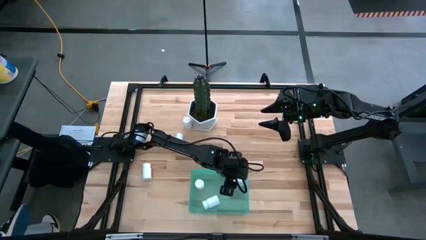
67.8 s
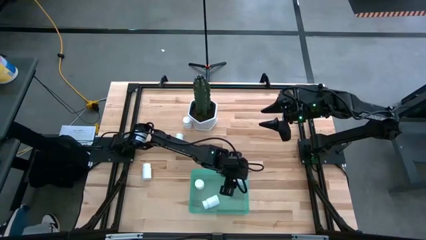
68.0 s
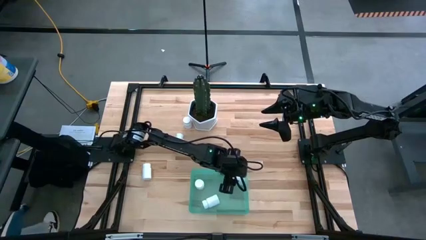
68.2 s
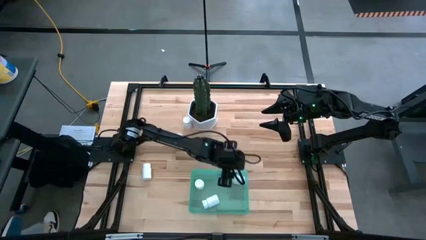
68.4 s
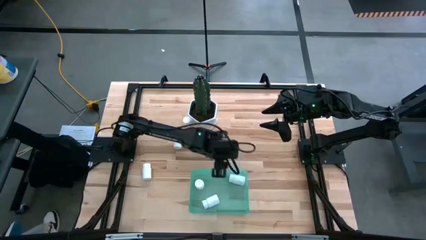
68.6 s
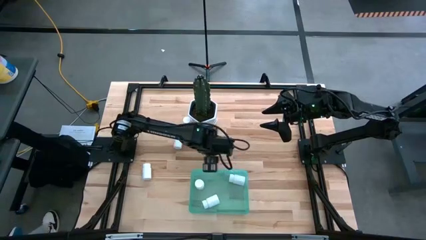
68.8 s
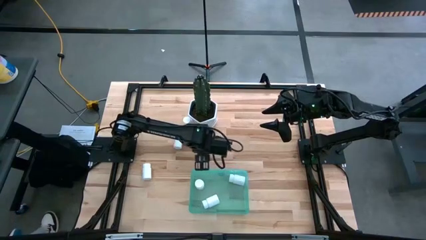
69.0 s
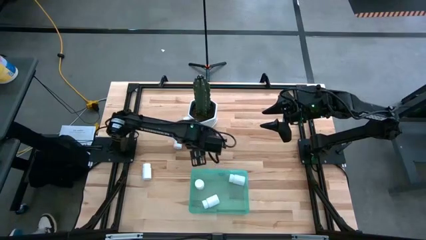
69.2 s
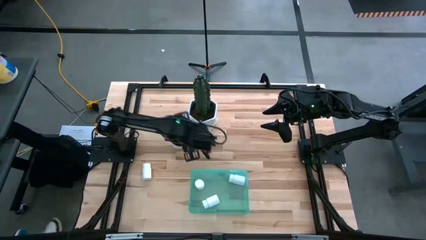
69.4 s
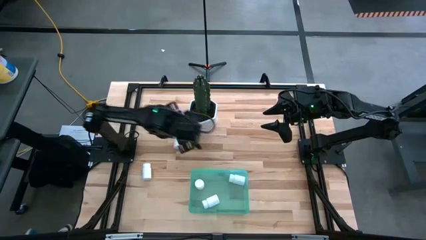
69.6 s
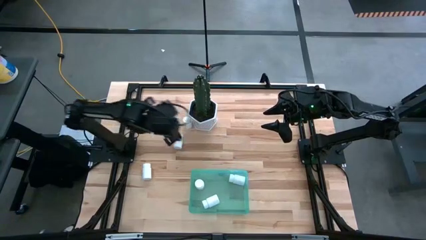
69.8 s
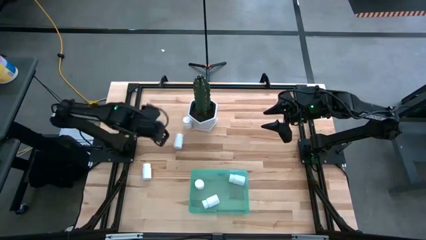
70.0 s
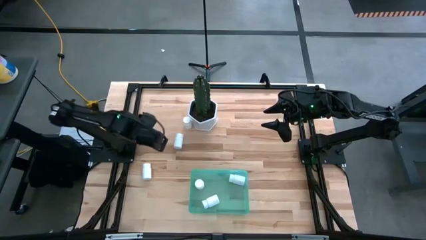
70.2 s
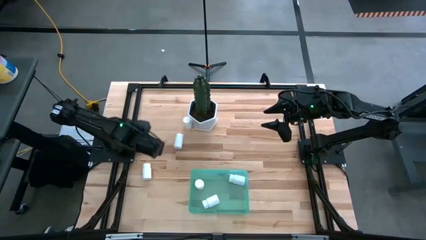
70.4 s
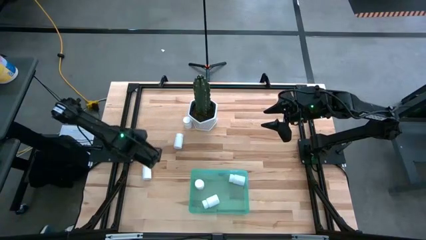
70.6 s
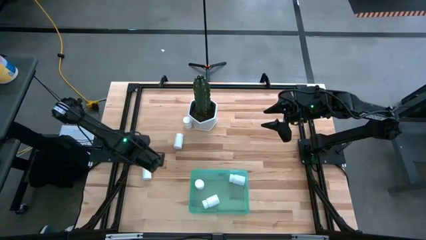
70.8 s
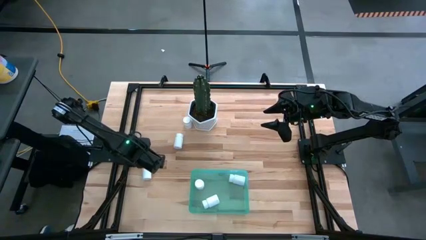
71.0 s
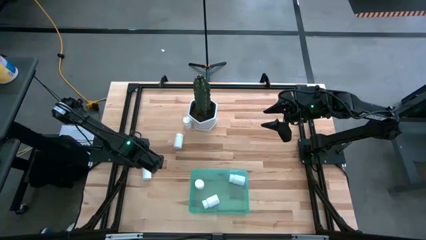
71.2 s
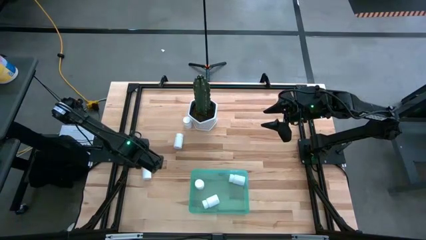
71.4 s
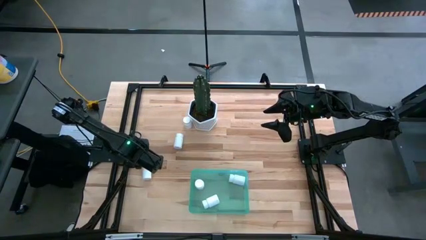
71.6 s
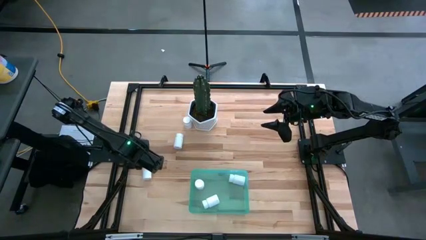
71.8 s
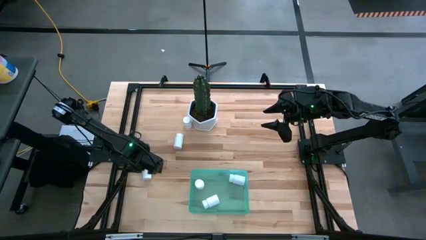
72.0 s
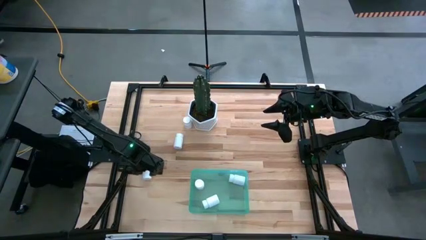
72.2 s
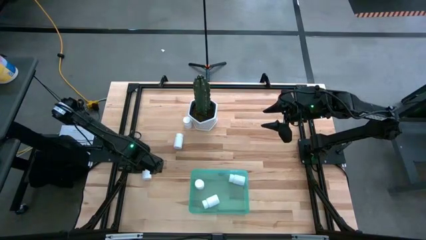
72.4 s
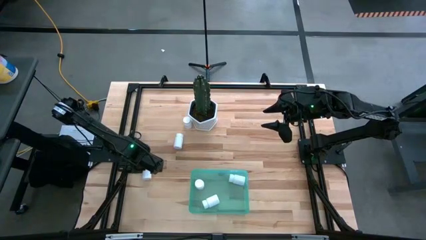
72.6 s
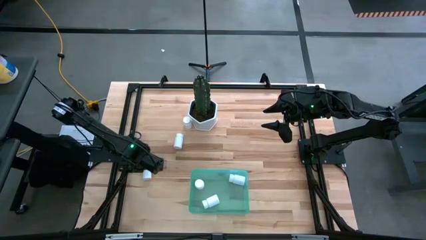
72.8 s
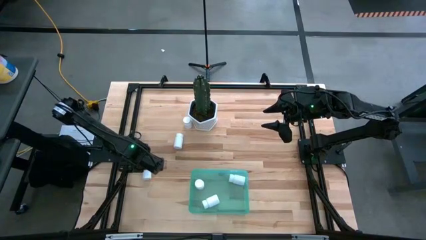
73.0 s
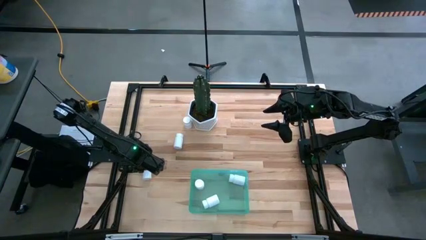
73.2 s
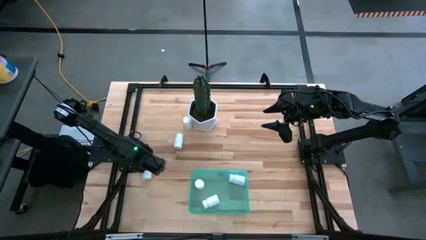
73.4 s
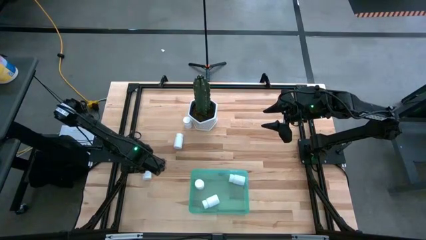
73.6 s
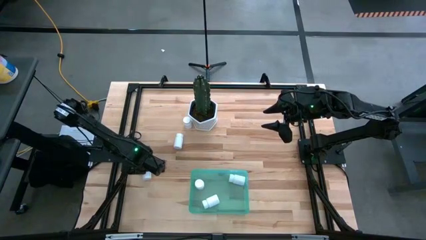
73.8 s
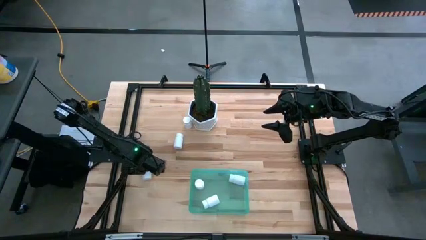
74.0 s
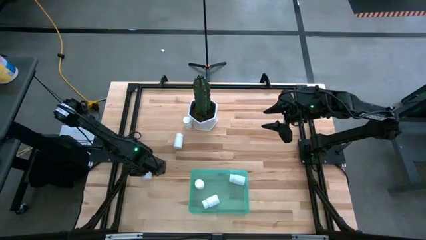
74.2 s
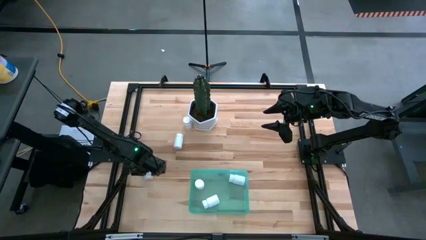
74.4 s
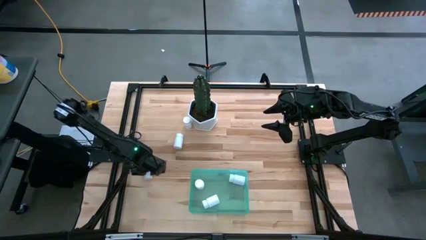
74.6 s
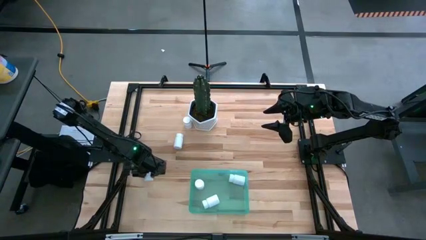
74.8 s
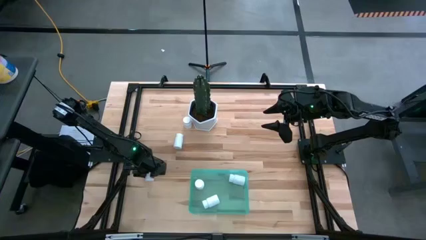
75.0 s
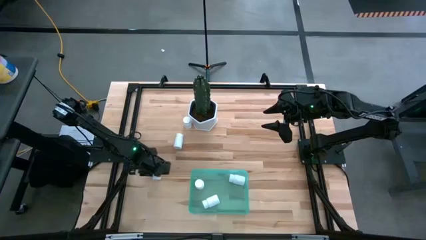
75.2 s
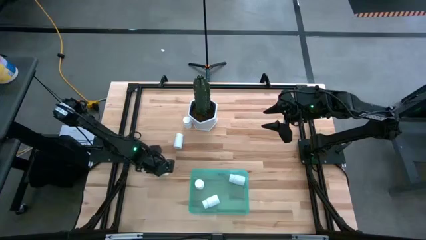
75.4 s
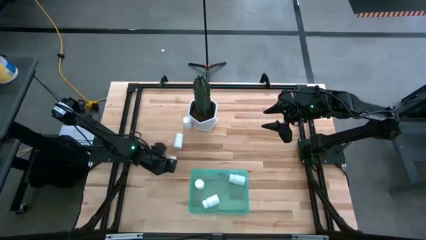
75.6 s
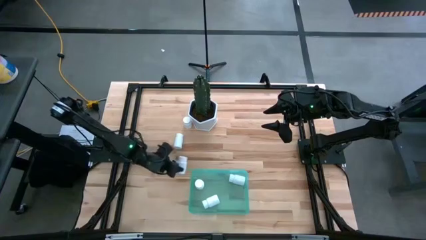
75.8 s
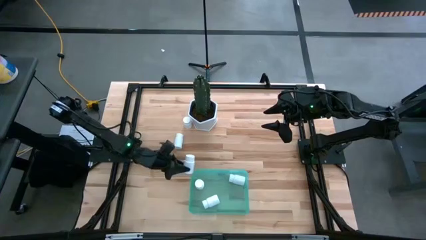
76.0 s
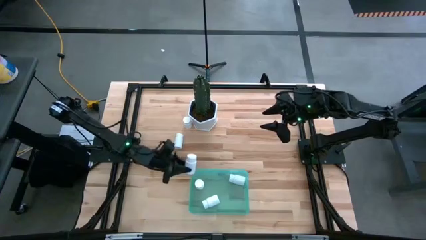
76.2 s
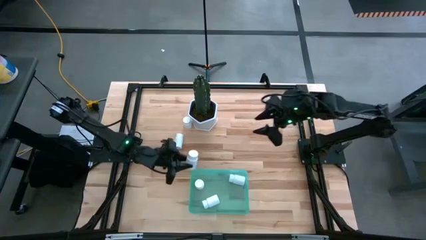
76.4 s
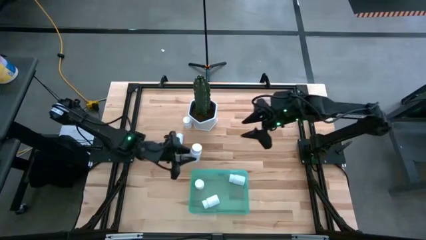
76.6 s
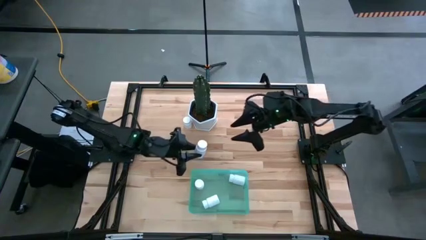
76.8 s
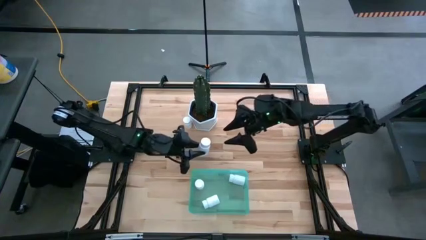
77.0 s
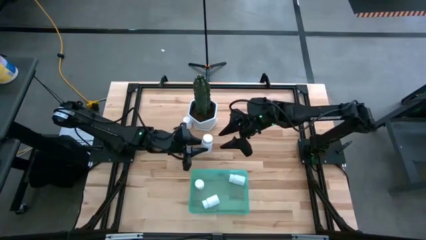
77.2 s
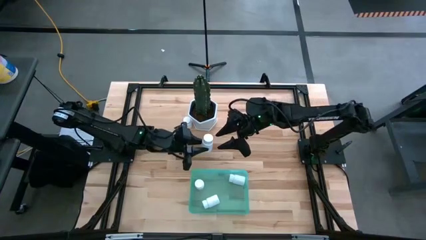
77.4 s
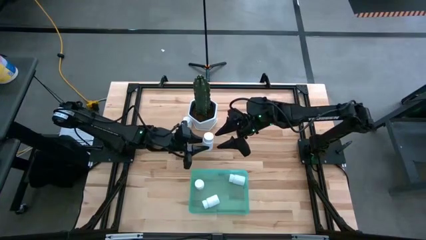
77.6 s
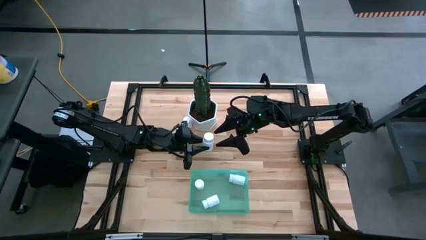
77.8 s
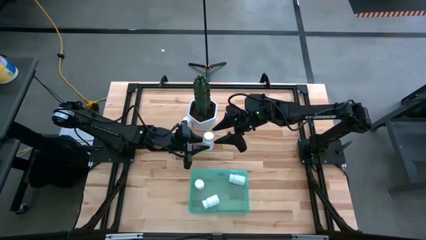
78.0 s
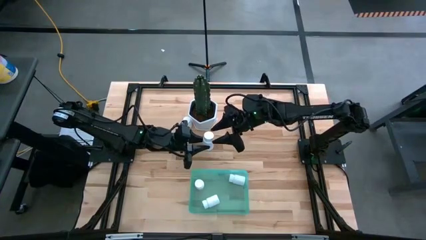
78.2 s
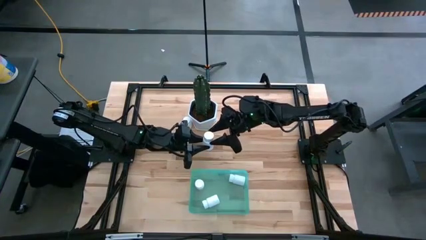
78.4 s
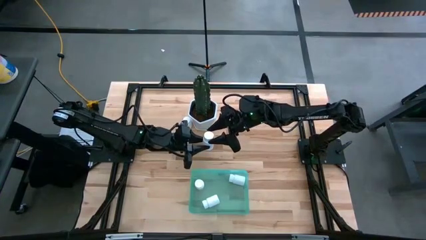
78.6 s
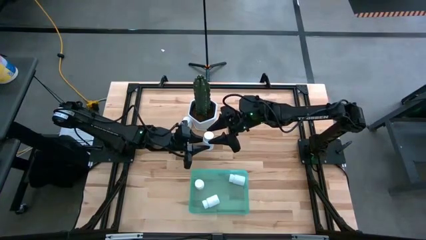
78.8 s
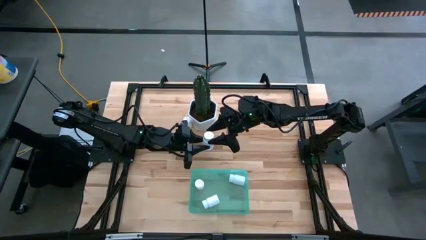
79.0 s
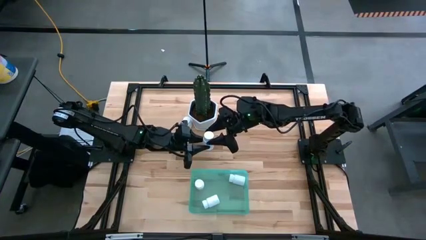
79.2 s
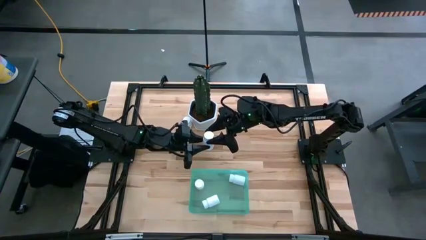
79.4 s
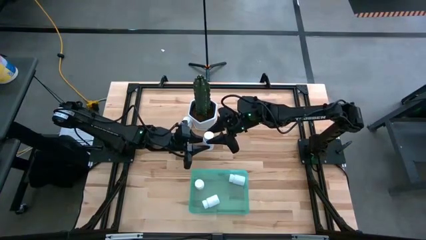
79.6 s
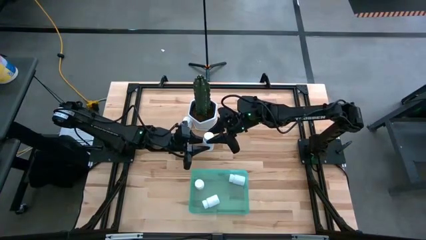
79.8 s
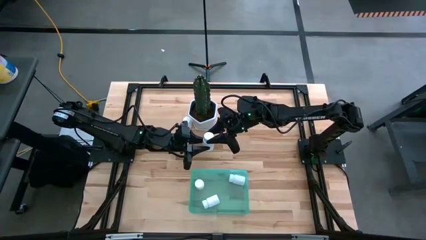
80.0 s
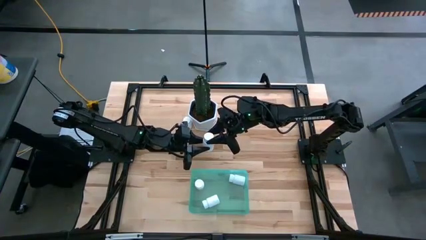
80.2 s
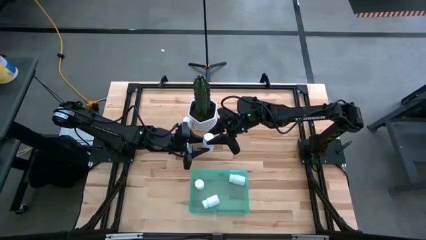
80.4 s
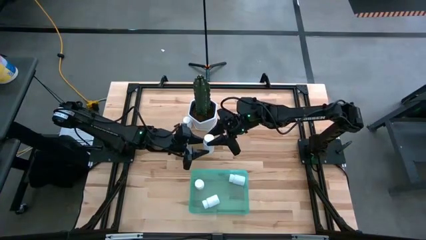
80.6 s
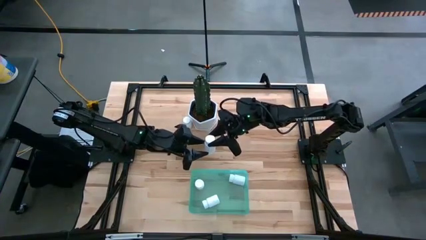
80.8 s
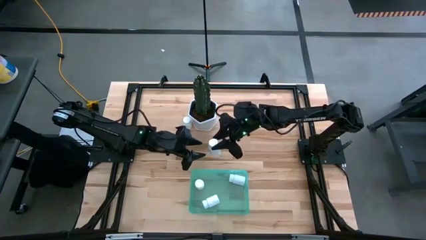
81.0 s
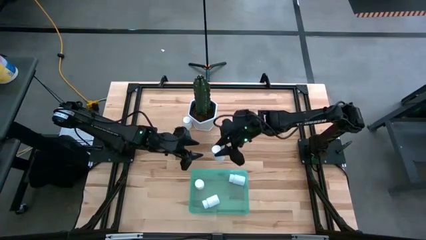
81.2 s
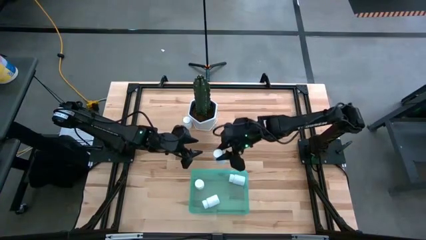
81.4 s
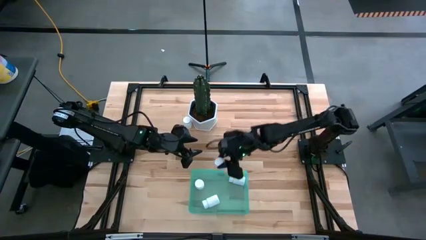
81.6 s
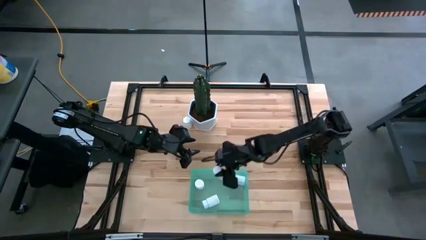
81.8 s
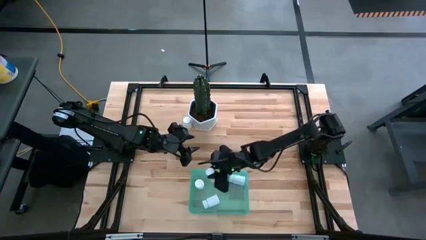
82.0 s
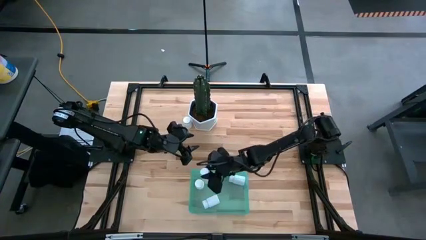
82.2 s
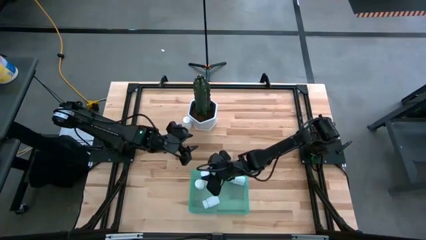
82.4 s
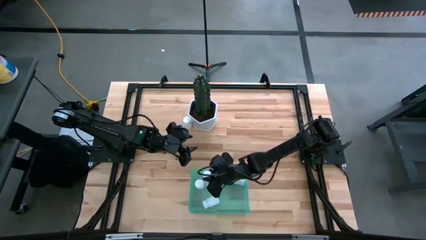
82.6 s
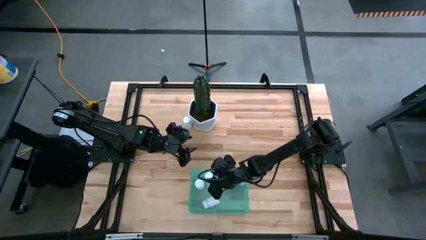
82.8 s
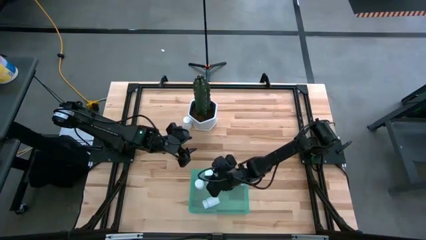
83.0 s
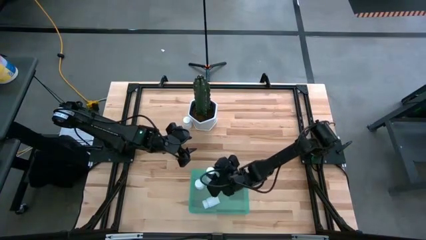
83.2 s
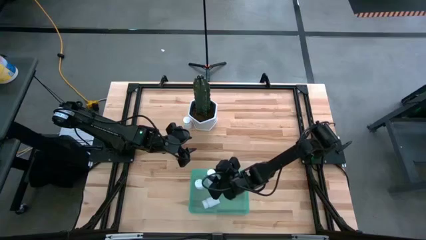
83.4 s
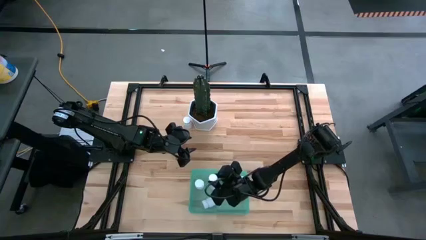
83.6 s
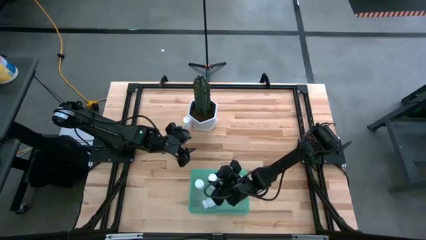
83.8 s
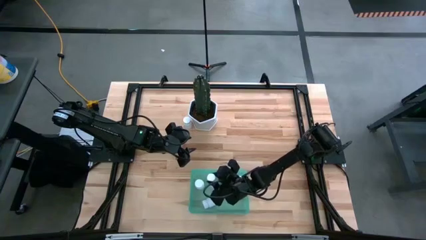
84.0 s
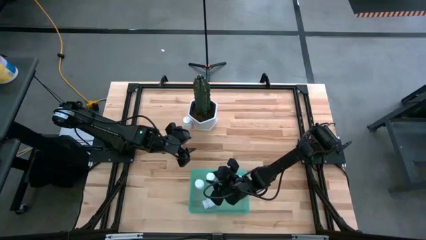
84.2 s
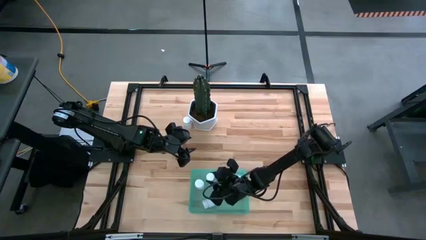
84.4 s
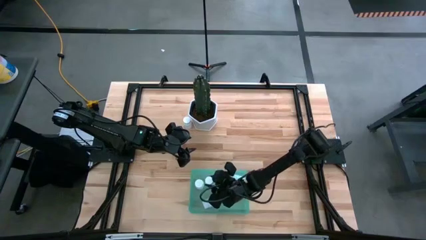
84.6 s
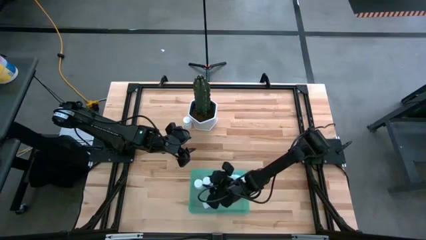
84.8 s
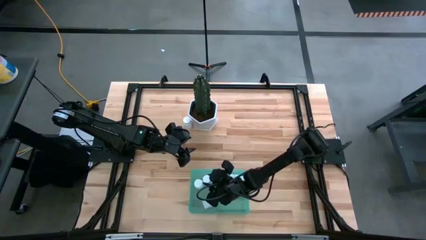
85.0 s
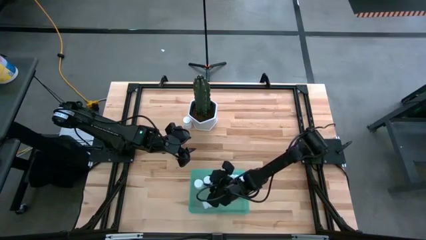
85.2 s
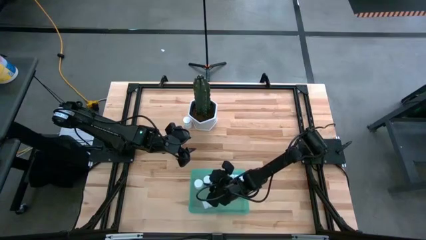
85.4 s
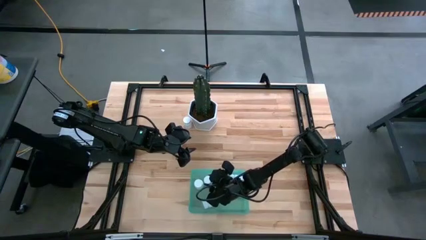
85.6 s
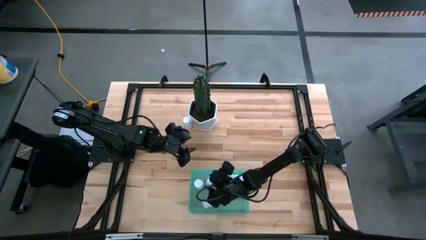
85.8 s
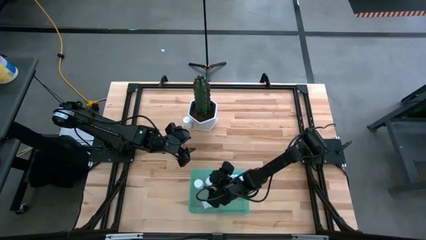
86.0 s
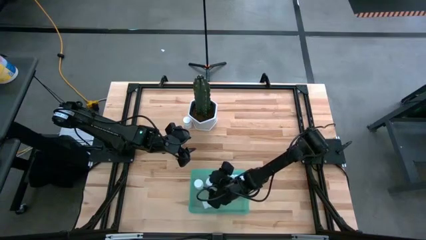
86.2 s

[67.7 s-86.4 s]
Task: Pick and place pill bottles into a basket
Put the white pill bottle into the green bin
